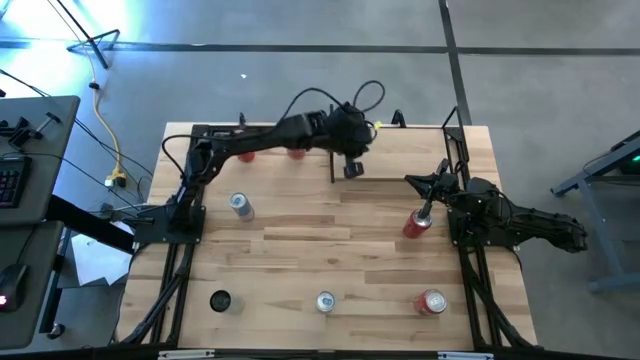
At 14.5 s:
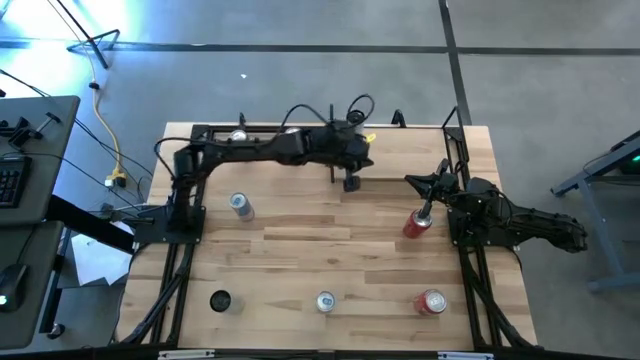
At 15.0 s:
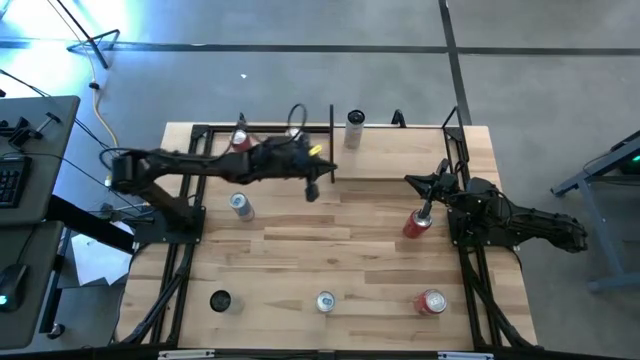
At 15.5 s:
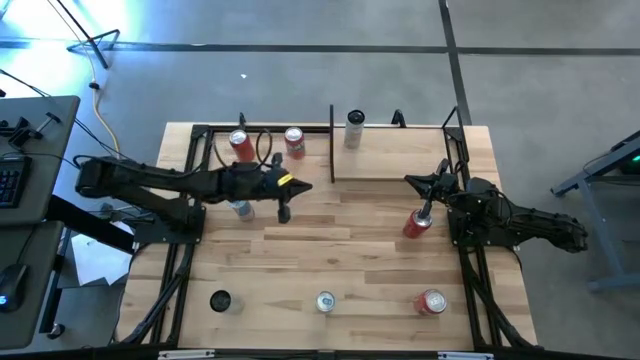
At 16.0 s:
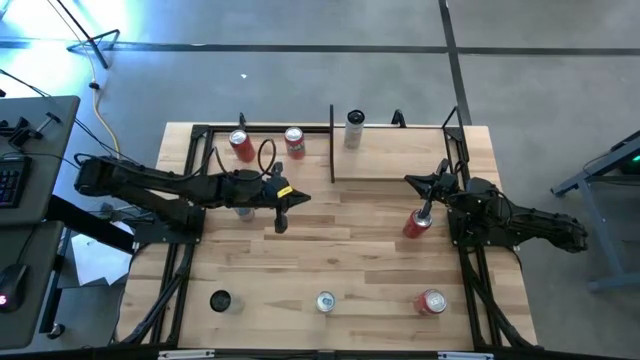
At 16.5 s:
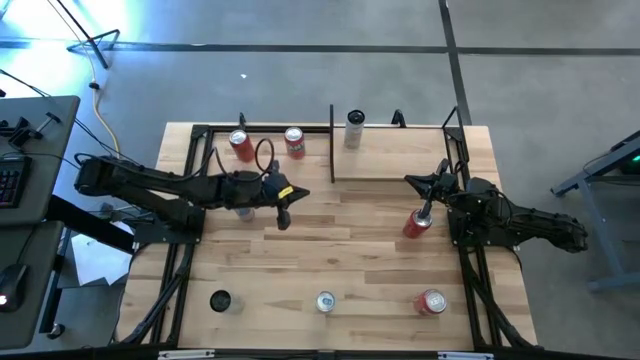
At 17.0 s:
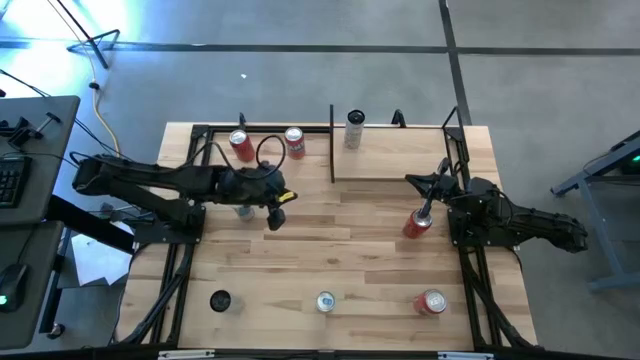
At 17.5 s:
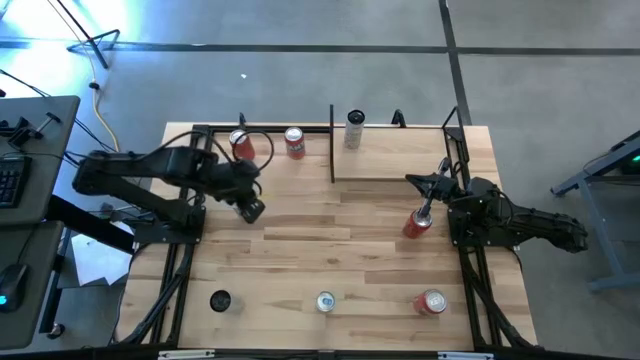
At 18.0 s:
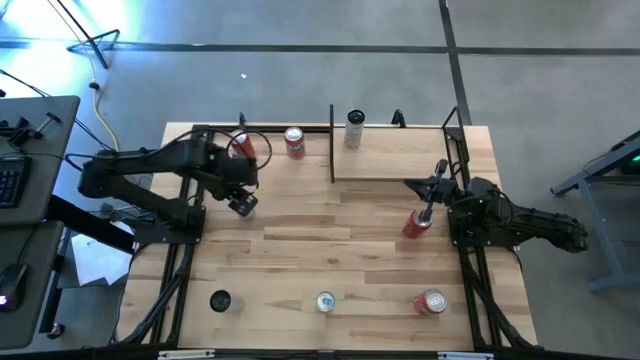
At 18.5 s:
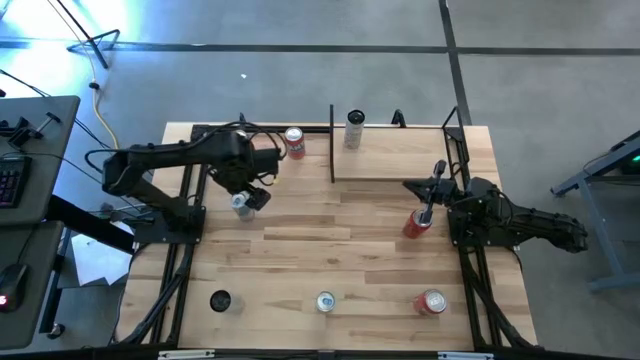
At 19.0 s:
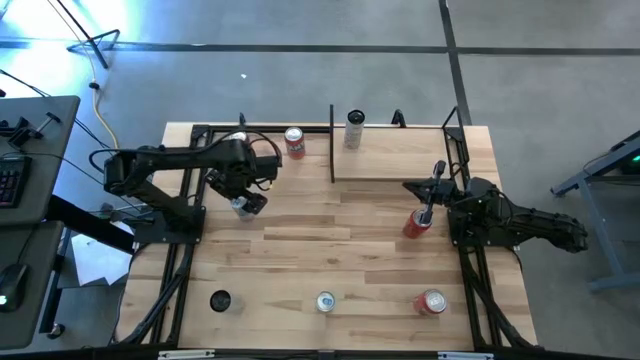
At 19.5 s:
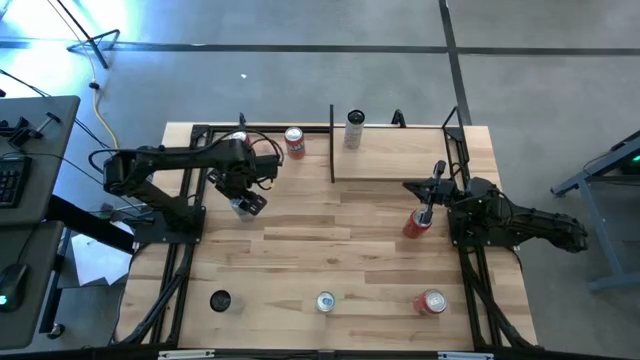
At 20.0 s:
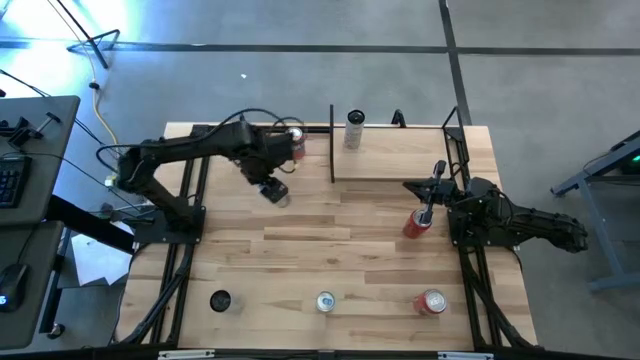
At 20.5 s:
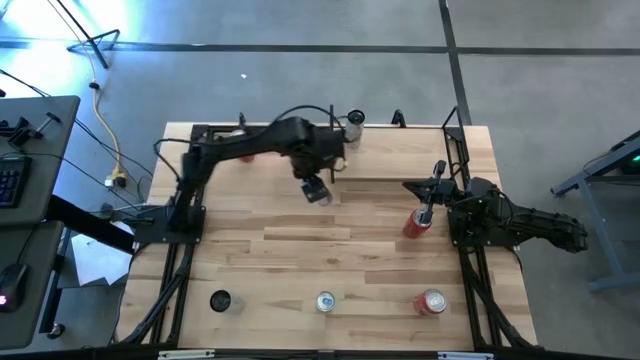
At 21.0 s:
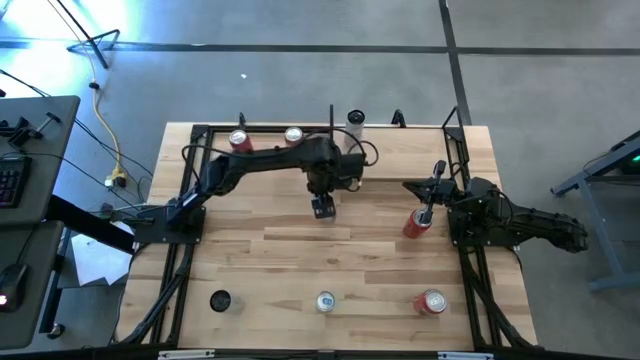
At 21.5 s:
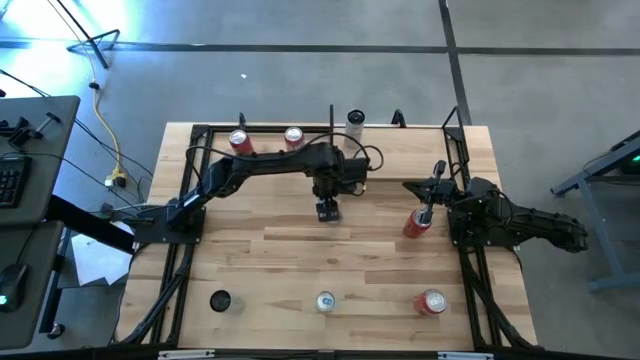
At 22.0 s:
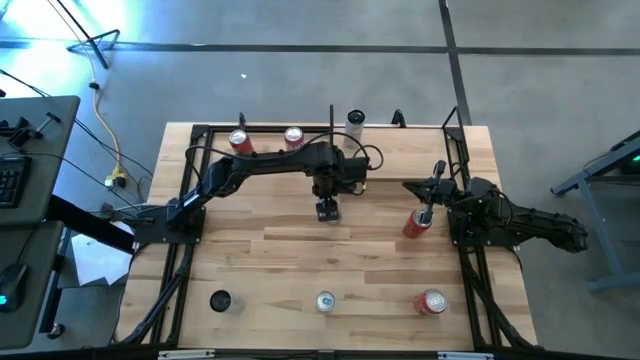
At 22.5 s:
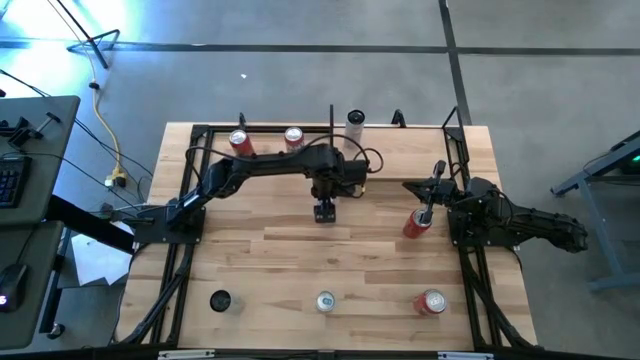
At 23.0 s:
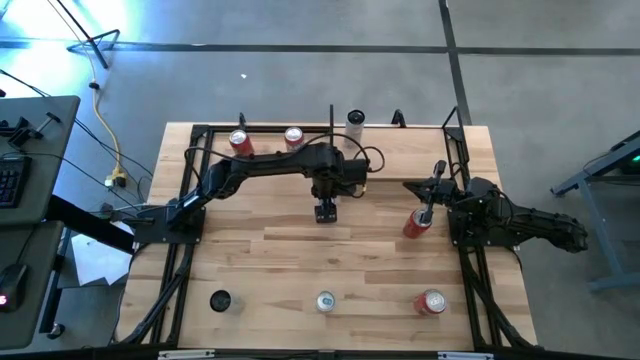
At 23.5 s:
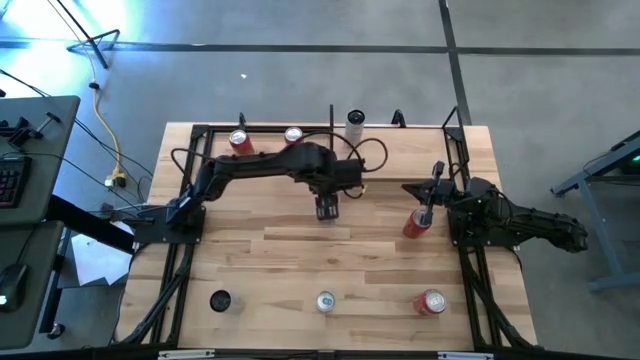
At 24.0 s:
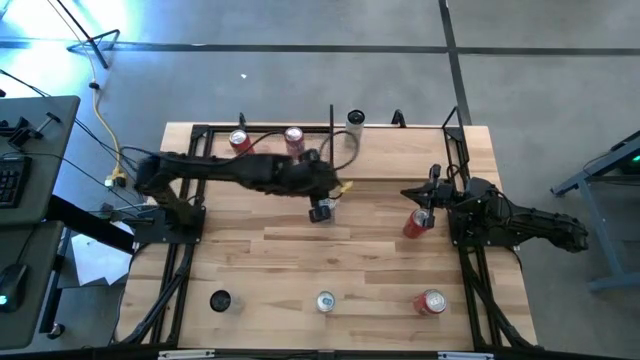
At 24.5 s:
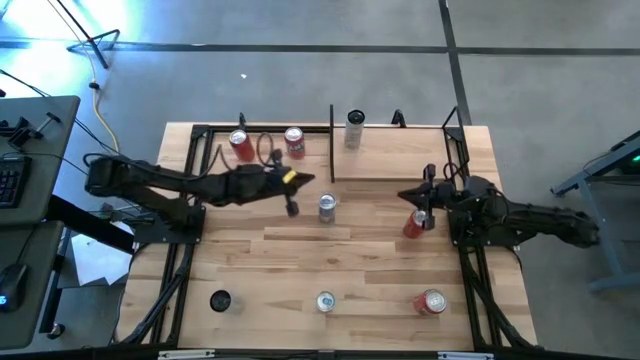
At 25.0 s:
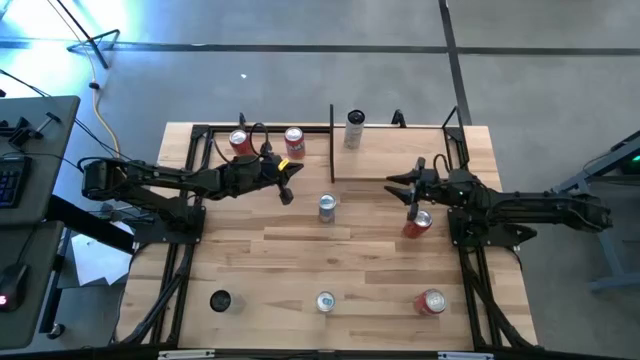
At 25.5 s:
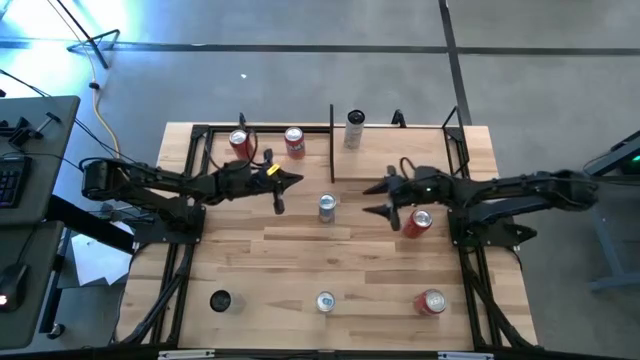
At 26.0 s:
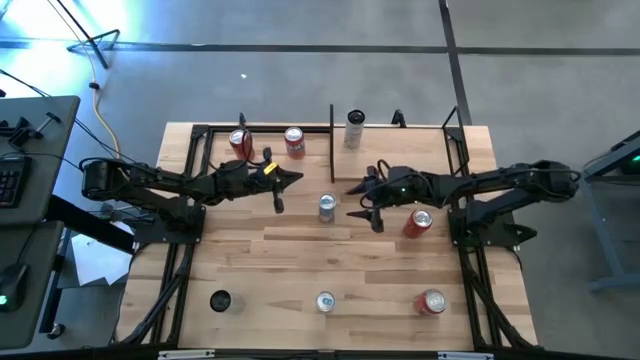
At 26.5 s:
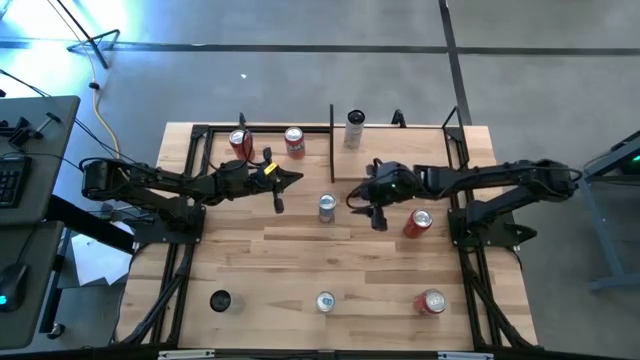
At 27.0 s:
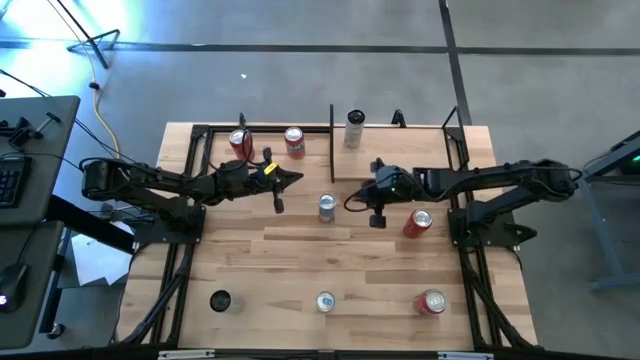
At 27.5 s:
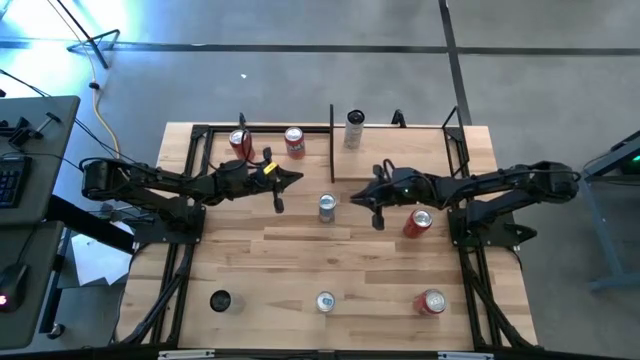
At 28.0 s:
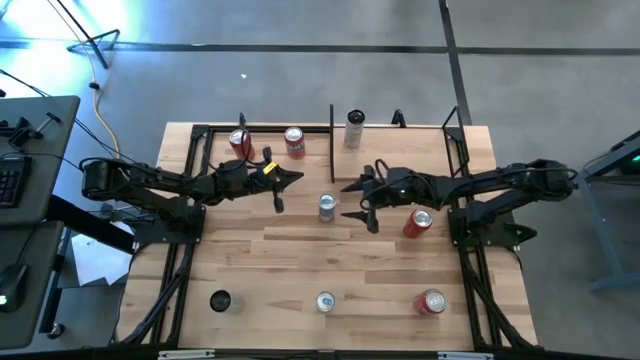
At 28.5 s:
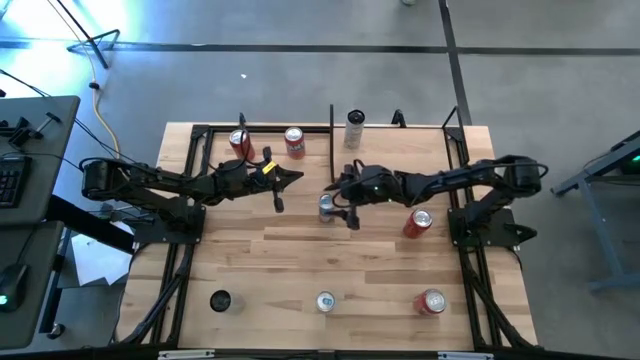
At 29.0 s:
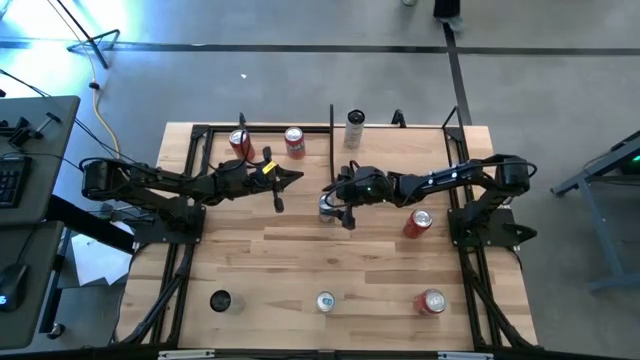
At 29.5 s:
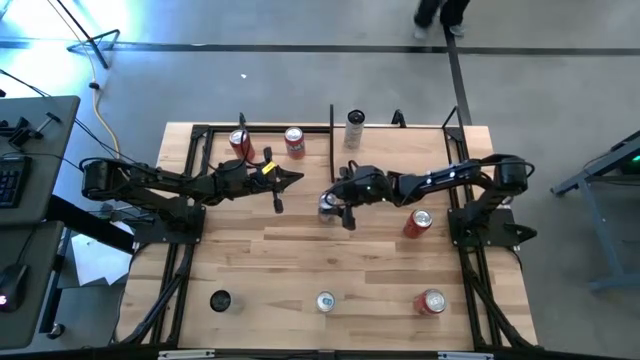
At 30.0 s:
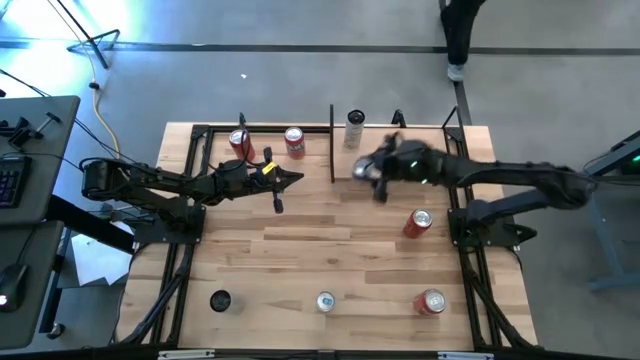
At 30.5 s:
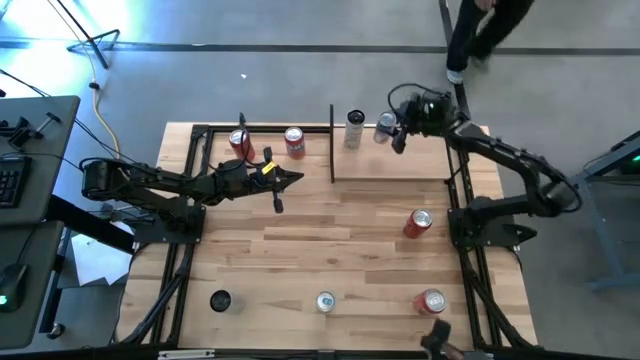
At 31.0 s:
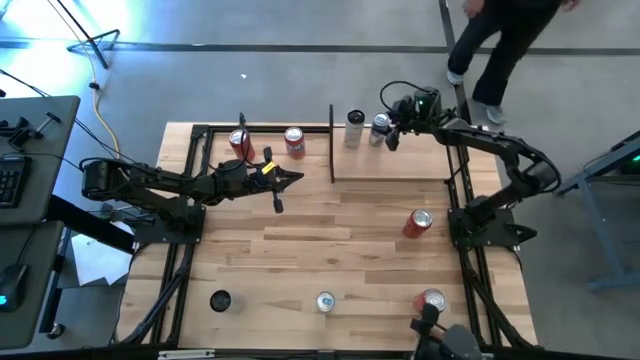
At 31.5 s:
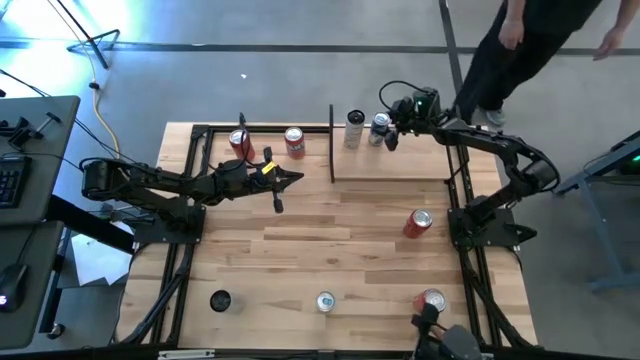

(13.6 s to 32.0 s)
Task: Place canned beverage on shelf
Put the top blue soda can on the shelf

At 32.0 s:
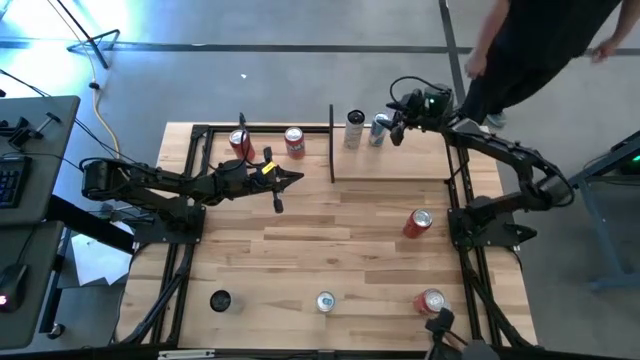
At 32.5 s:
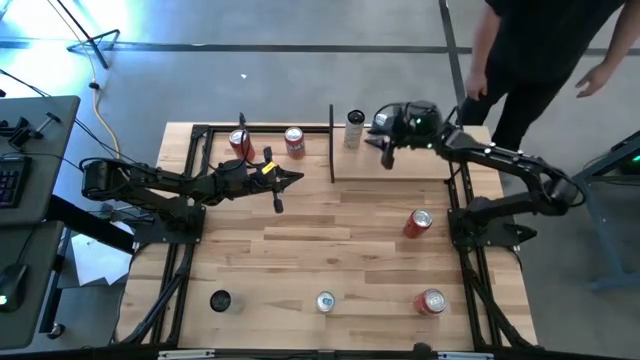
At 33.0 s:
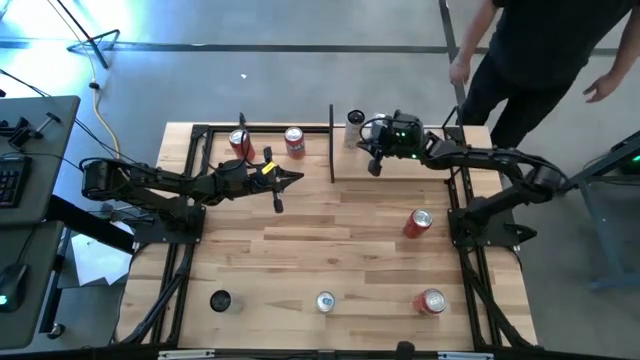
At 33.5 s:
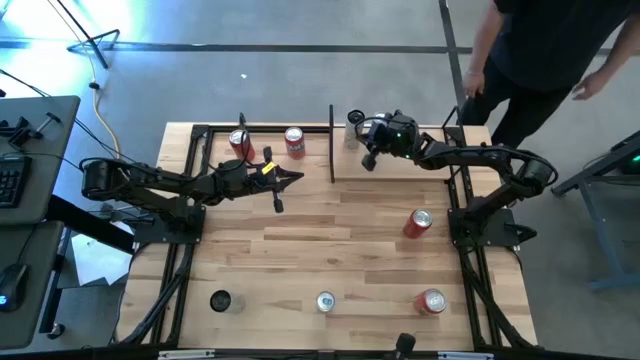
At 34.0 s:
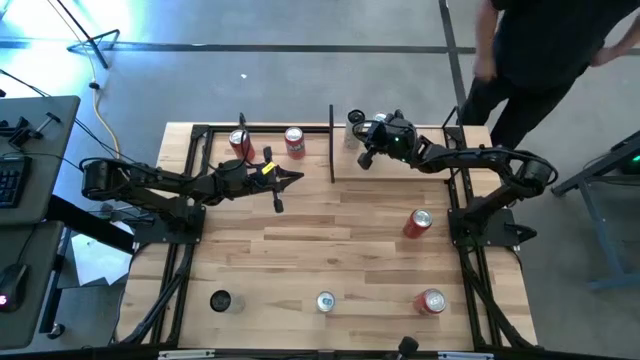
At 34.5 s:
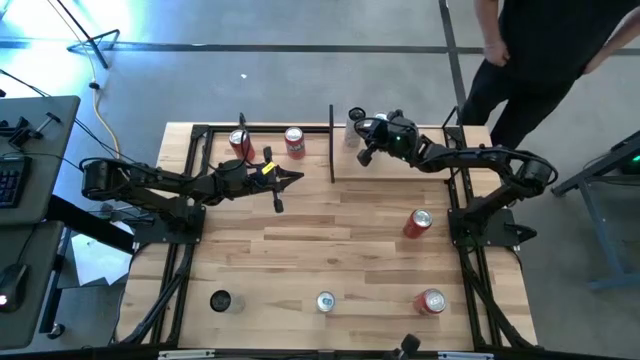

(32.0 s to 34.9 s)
Adjust the white soda can on the shelf
